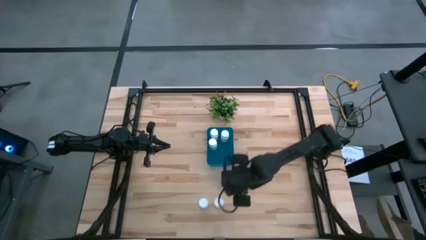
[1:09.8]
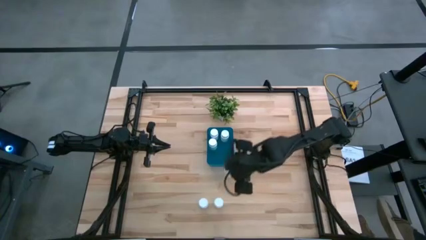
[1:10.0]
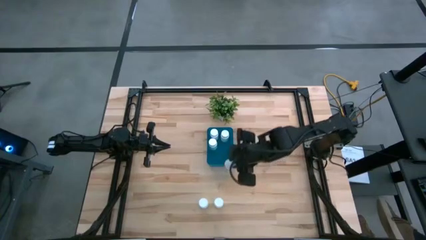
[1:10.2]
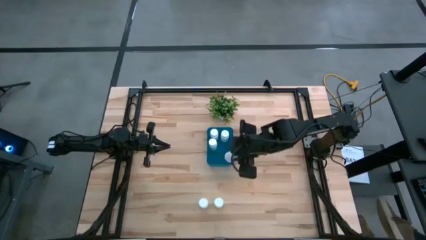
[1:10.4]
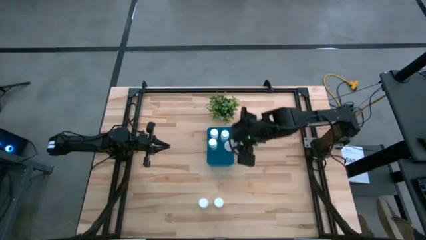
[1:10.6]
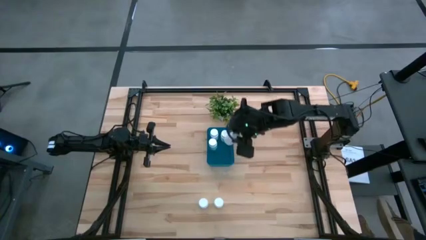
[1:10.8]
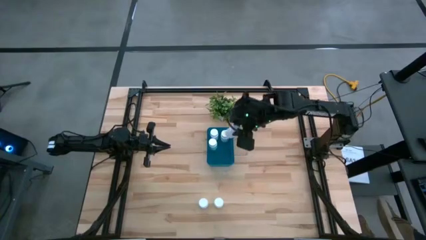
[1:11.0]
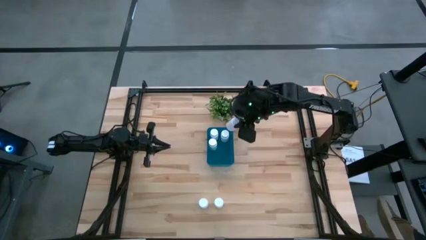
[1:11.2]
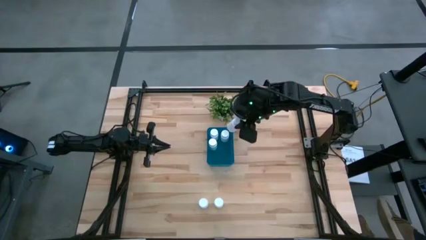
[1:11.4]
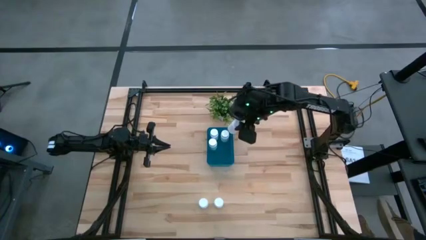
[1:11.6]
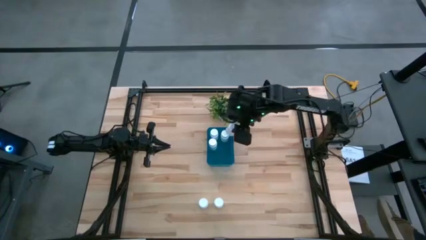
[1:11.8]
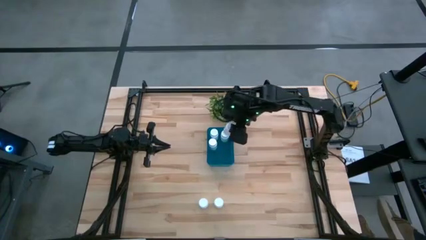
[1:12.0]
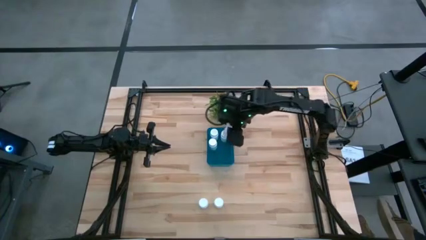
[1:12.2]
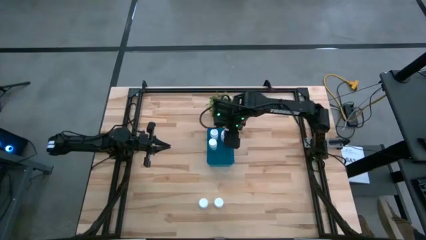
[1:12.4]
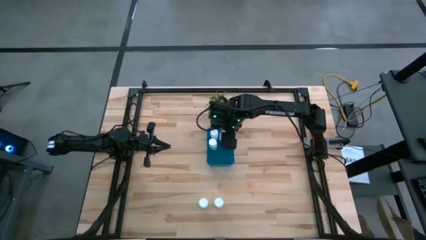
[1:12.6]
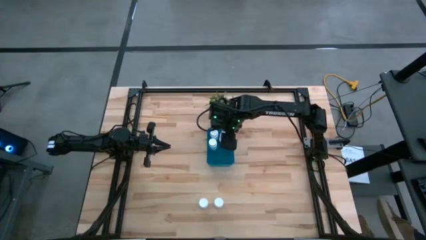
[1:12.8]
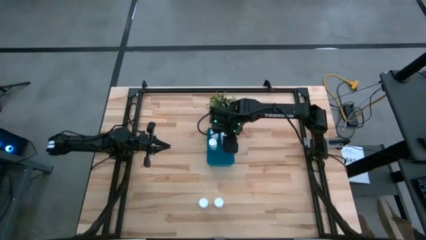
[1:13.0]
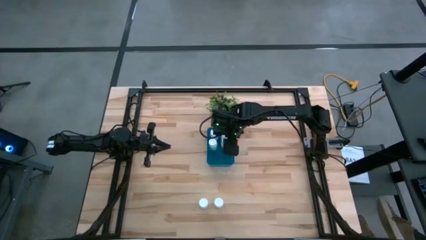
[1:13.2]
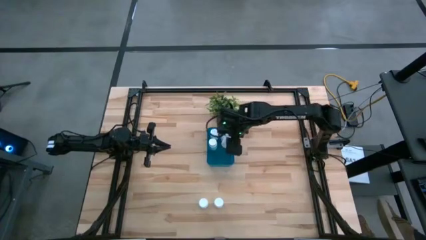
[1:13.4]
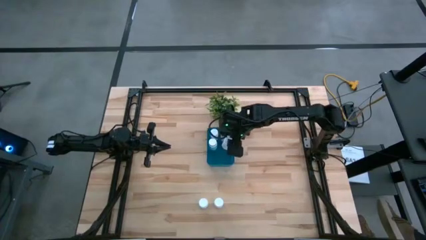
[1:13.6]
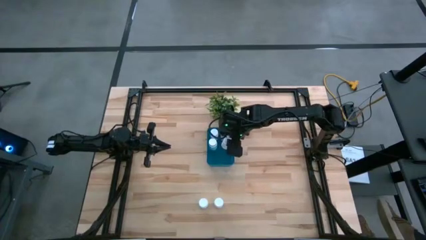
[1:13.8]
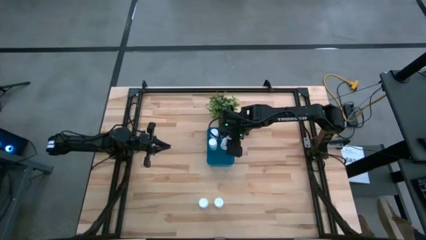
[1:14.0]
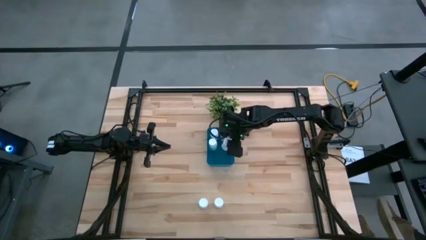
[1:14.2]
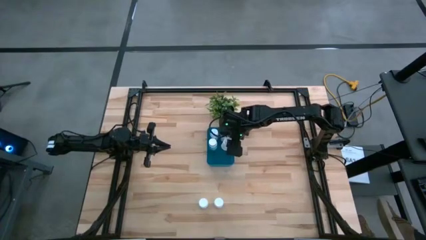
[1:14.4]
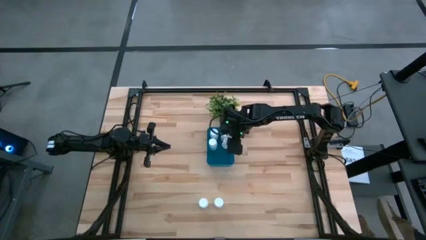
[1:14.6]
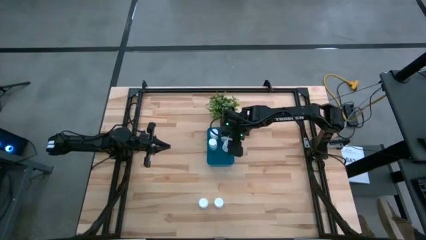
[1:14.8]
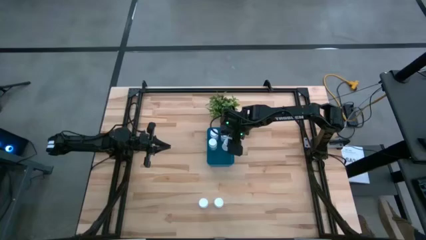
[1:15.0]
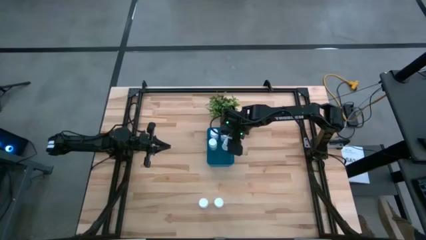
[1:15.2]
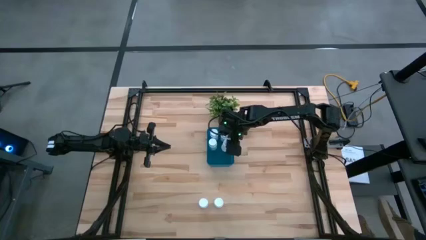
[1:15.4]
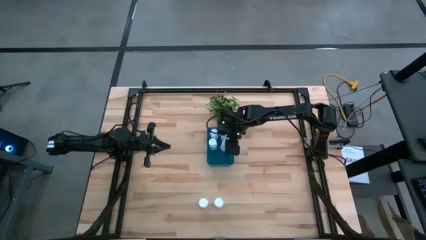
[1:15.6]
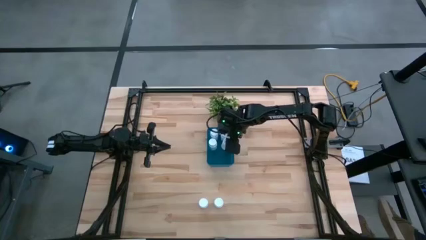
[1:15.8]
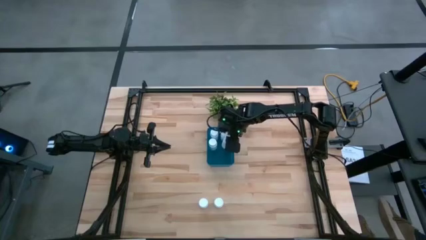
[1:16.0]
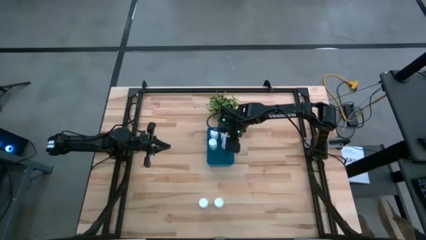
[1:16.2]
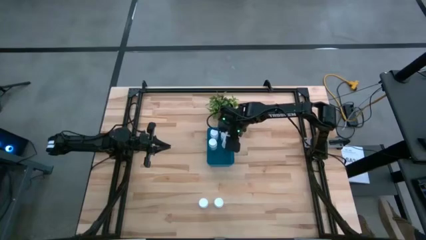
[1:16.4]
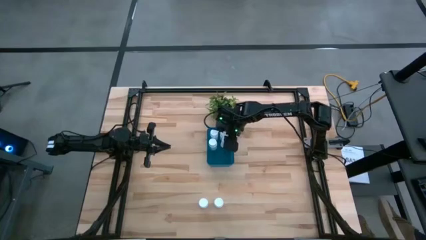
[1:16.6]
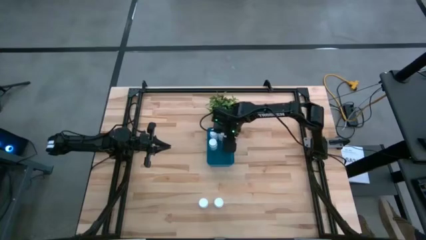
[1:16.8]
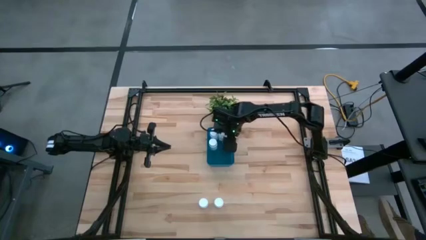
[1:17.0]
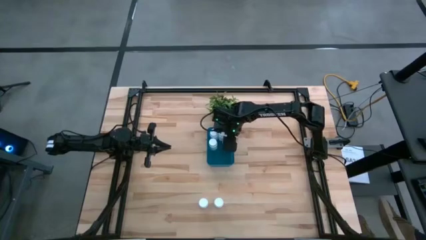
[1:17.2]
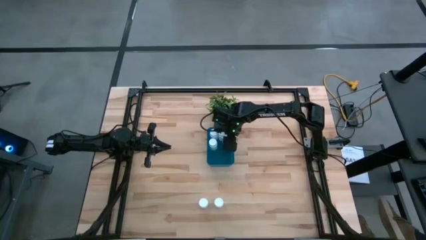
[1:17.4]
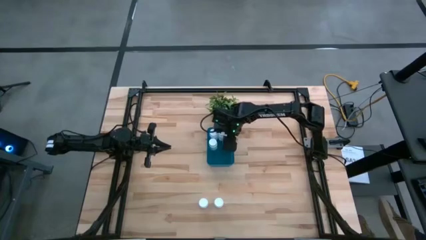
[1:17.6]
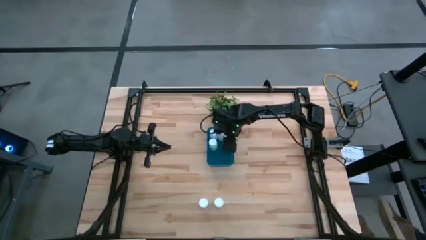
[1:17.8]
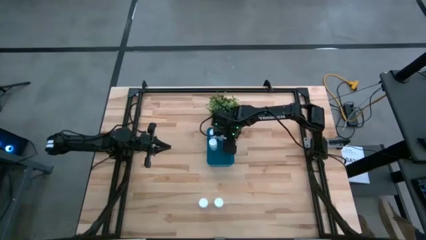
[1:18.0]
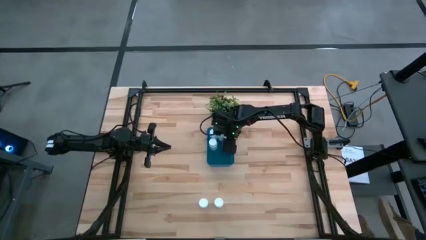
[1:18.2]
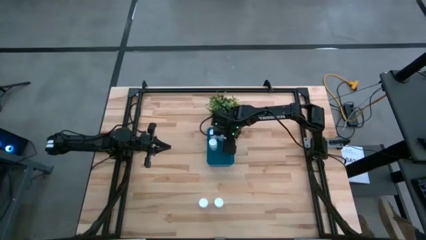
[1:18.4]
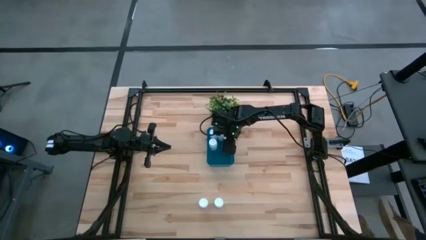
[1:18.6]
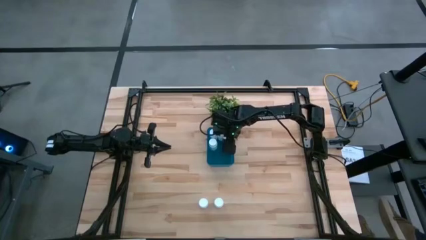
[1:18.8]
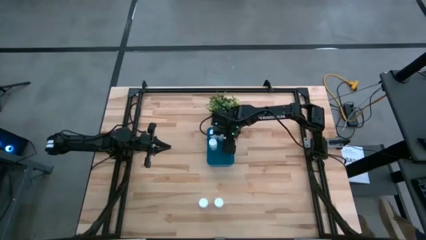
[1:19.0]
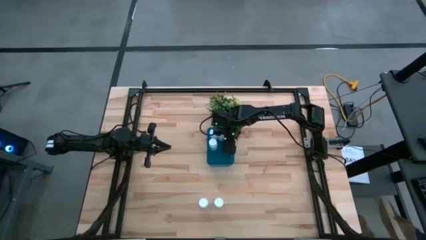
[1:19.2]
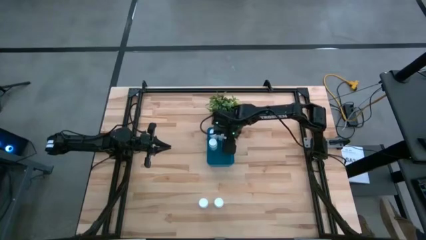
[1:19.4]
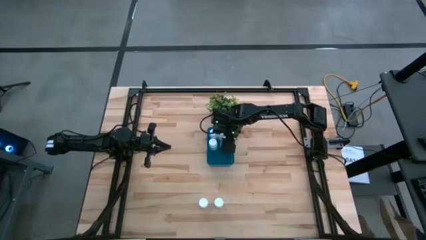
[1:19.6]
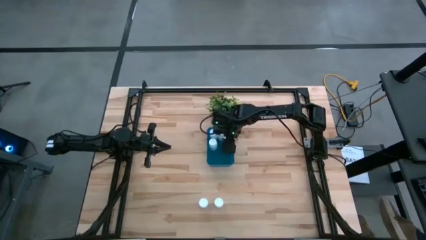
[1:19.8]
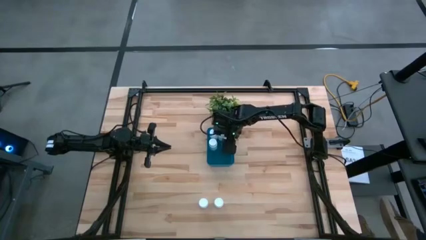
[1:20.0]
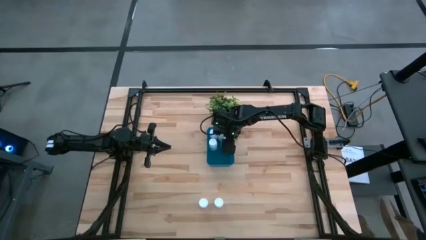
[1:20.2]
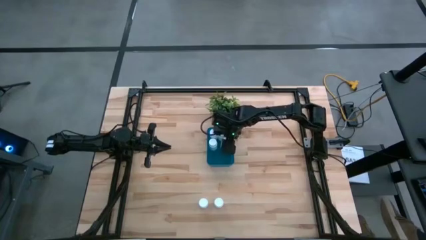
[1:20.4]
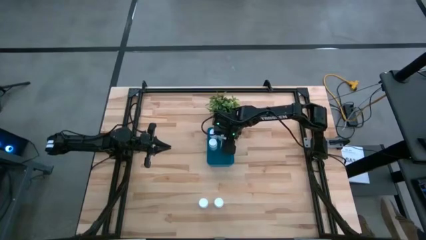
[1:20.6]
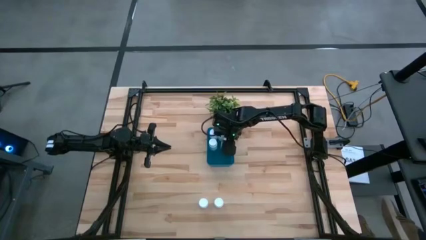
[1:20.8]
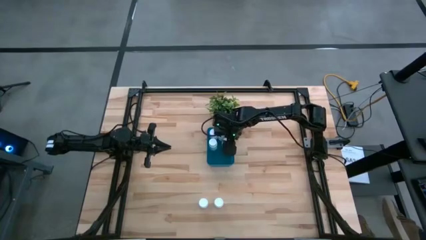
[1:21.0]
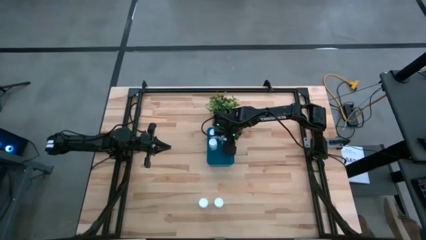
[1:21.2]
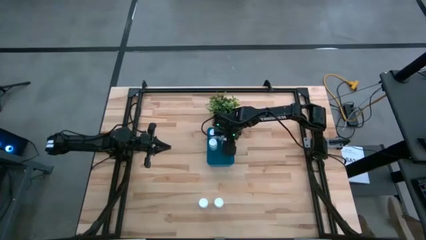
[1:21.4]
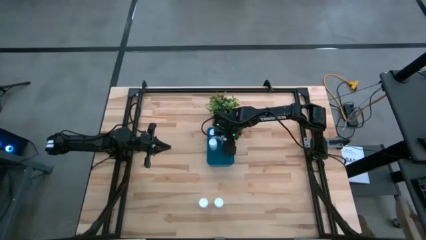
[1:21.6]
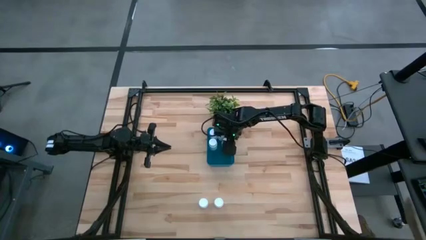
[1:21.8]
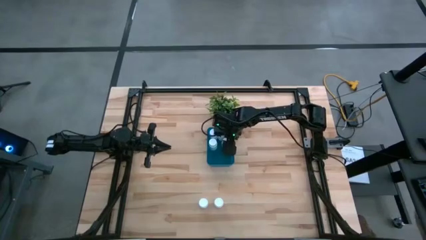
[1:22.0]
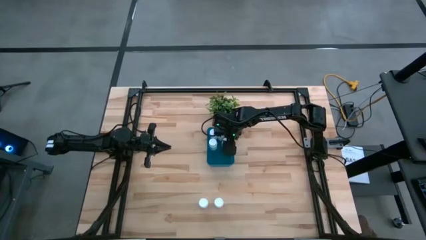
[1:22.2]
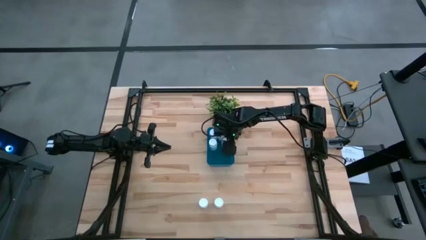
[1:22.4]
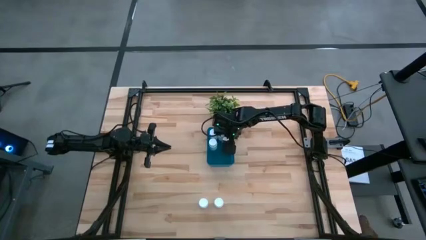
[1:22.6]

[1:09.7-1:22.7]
Task: Pick and place pill bottles into a basket
Put the white pill bottle into the blue bin
